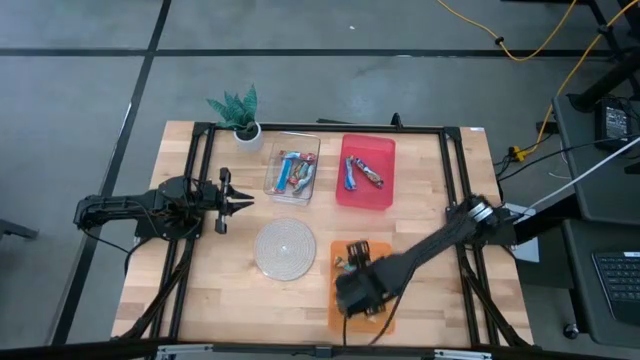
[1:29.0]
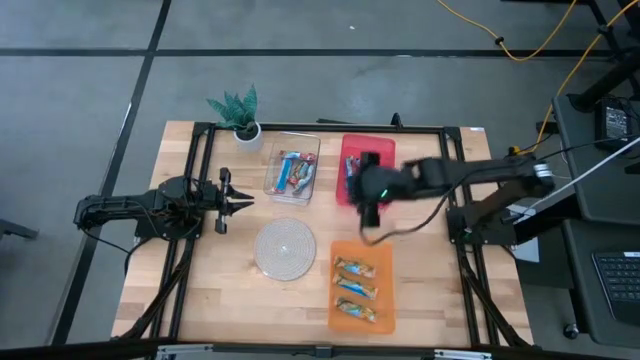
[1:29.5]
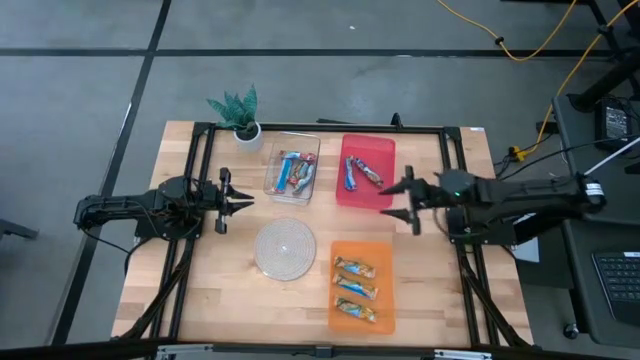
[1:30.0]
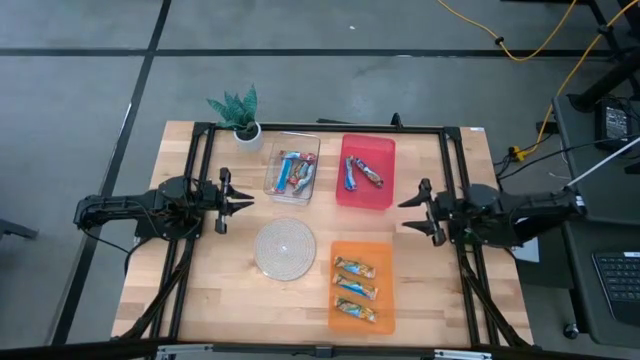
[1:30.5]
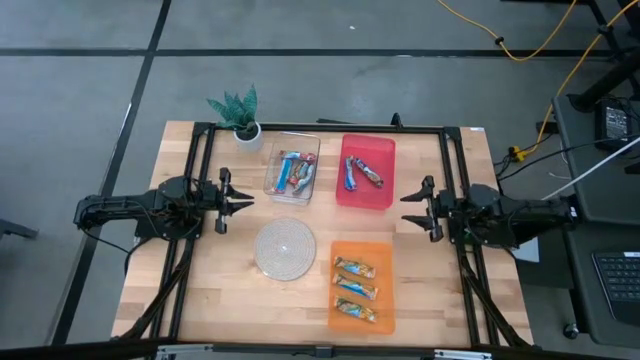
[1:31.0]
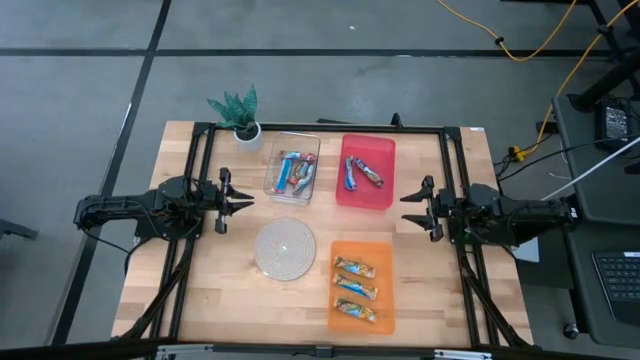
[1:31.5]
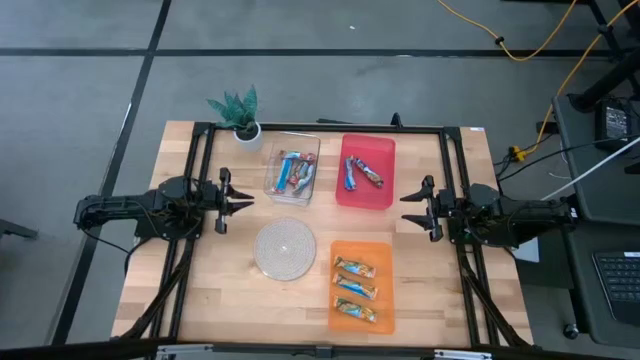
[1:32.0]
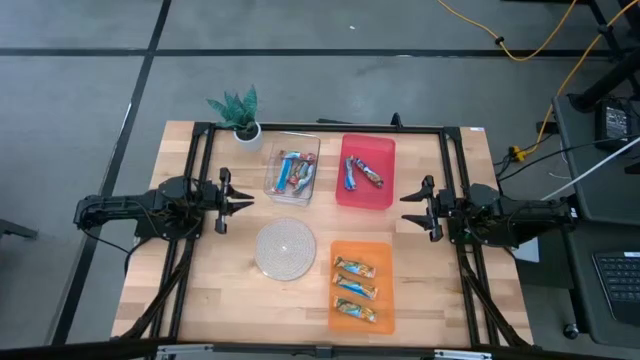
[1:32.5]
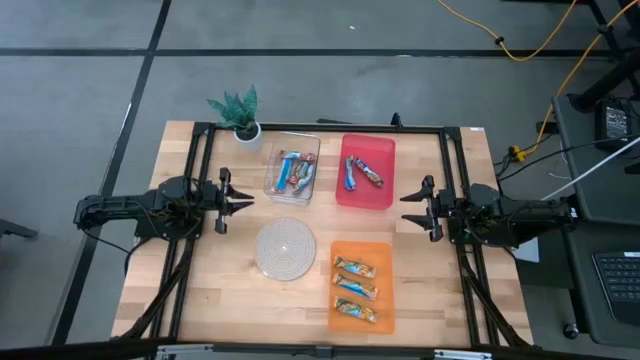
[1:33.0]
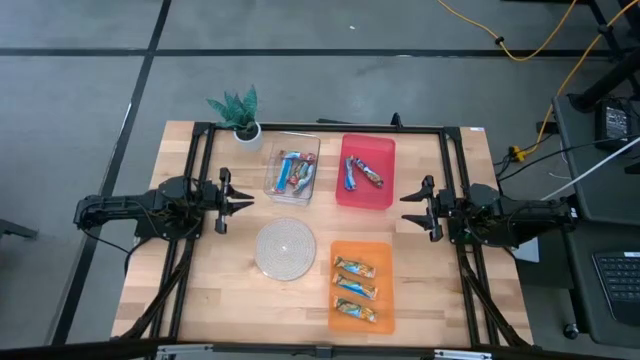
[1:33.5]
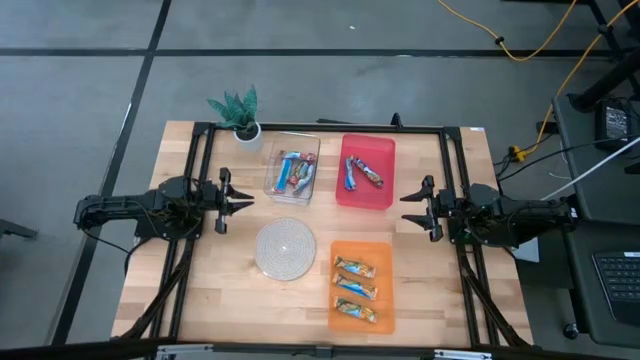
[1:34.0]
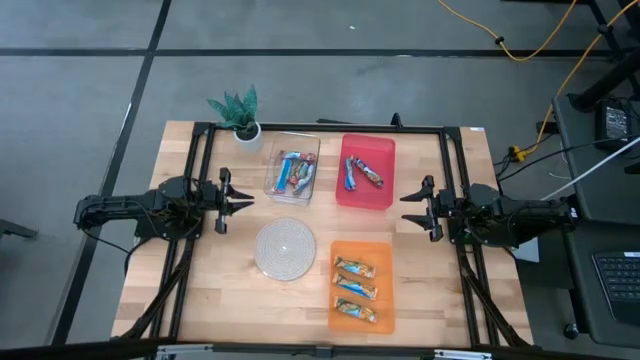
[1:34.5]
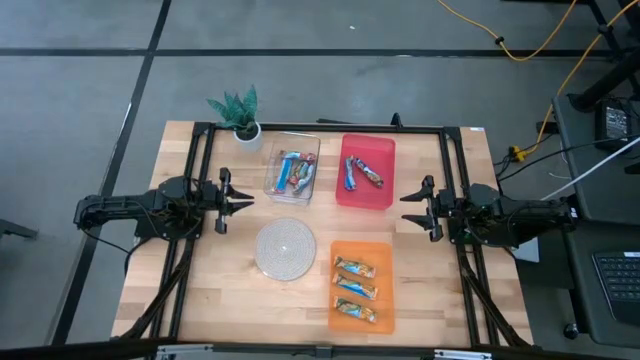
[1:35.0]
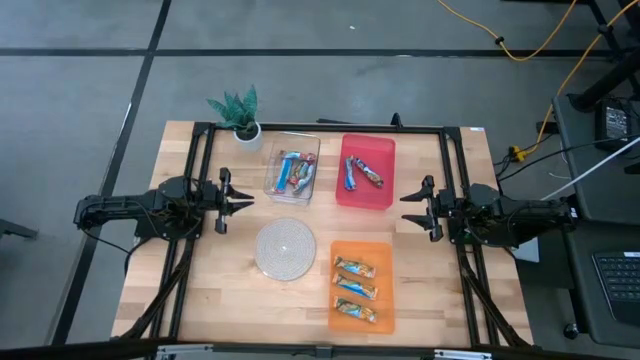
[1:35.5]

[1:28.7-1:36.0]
Task: Pick and place Granola Bars by type
Return to Home Position

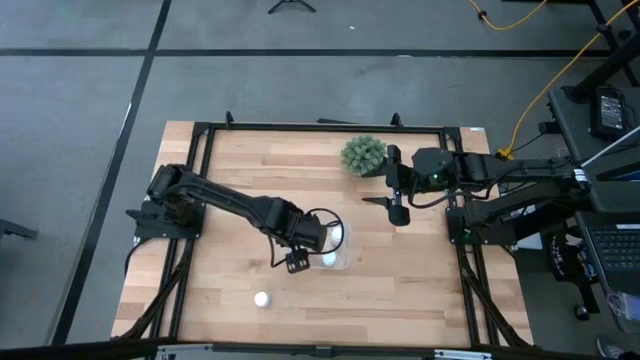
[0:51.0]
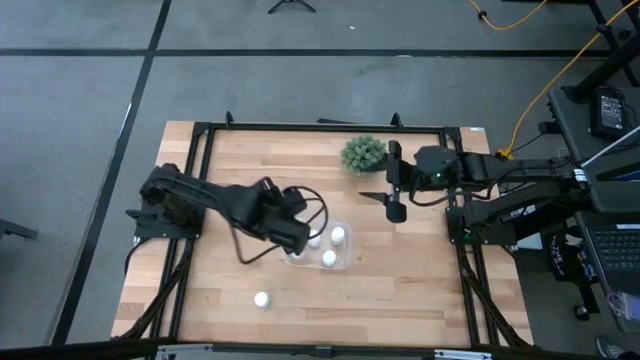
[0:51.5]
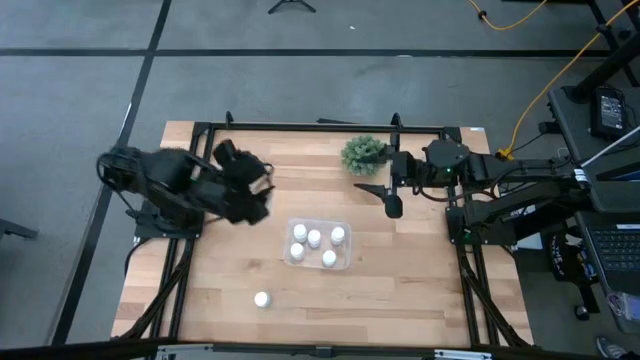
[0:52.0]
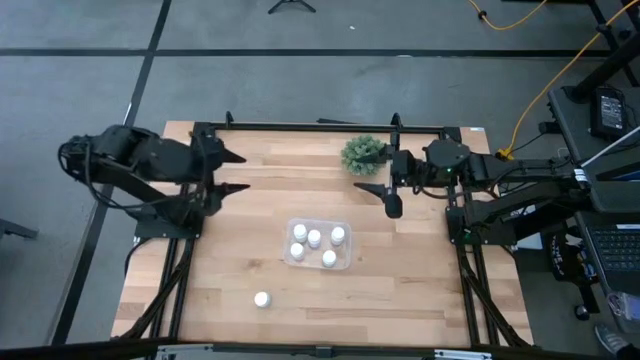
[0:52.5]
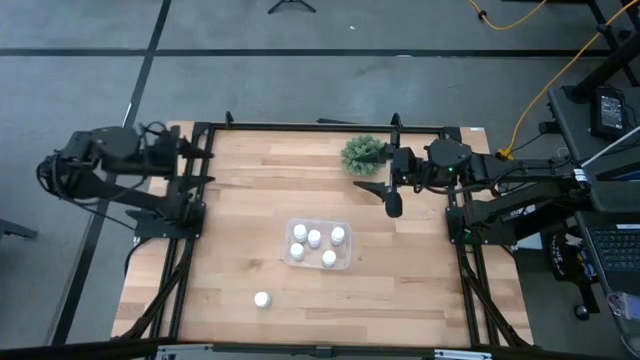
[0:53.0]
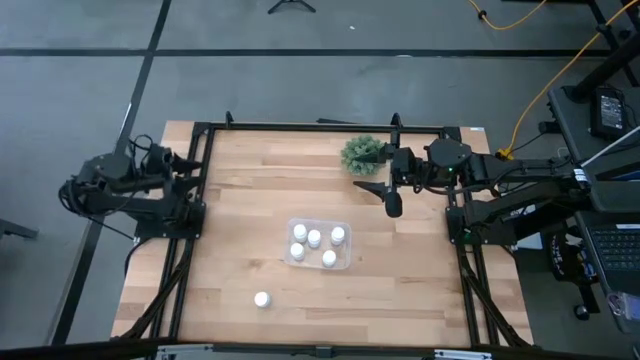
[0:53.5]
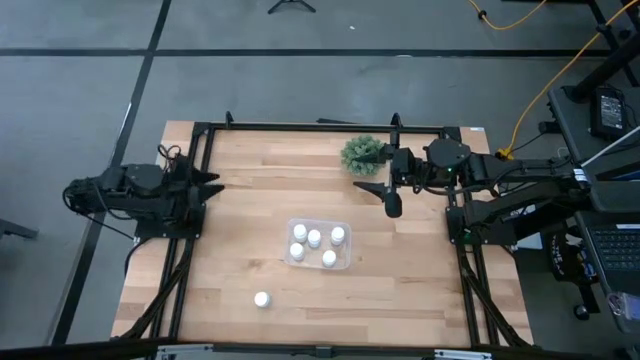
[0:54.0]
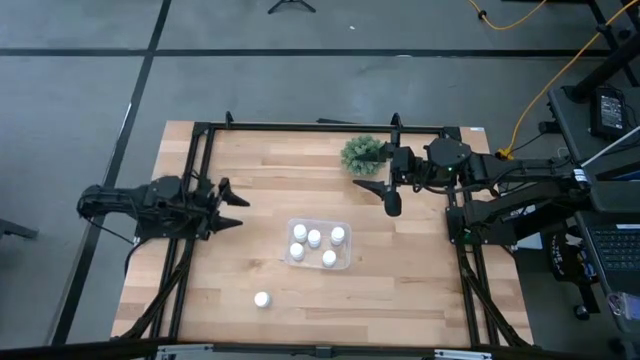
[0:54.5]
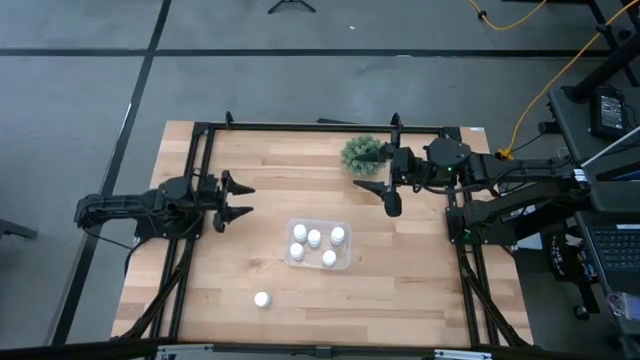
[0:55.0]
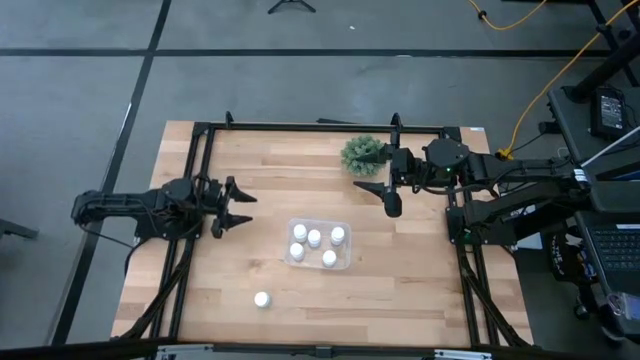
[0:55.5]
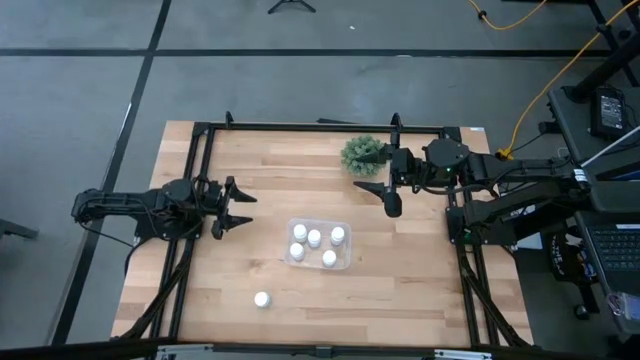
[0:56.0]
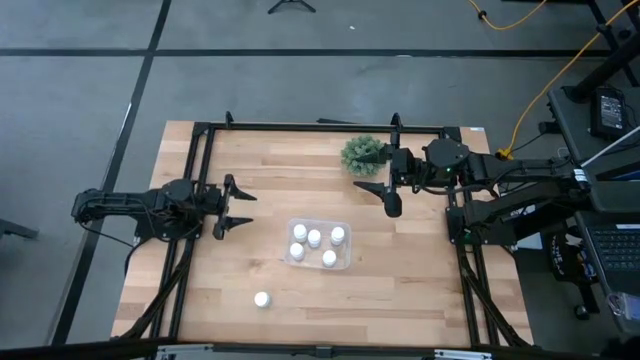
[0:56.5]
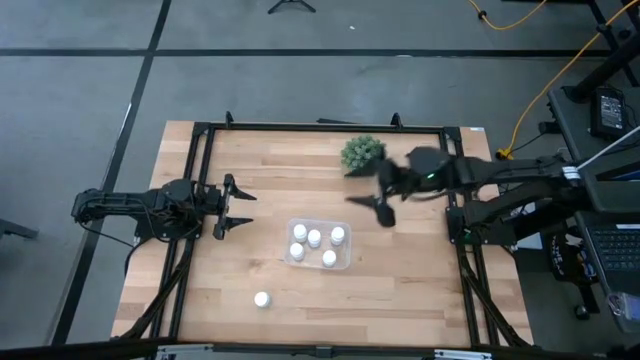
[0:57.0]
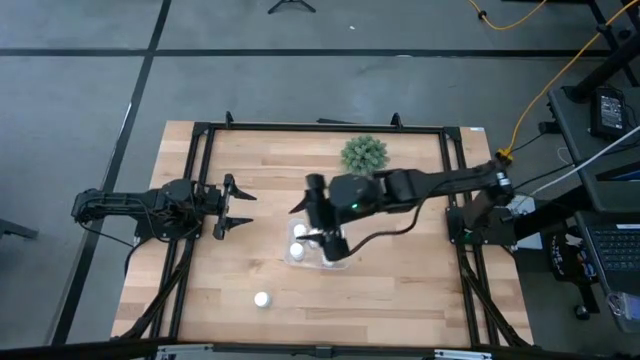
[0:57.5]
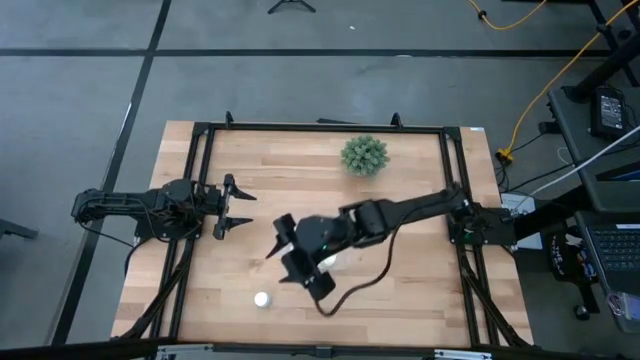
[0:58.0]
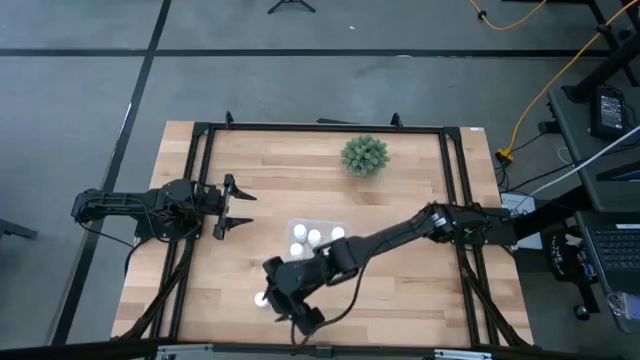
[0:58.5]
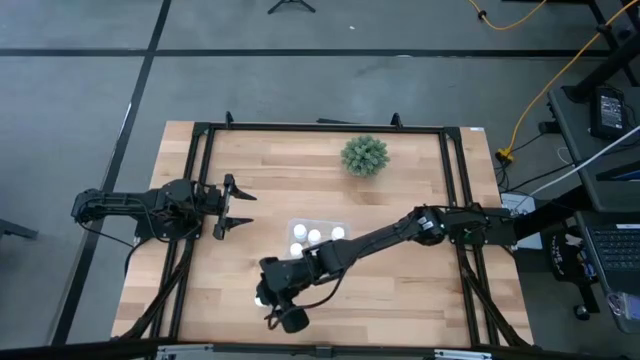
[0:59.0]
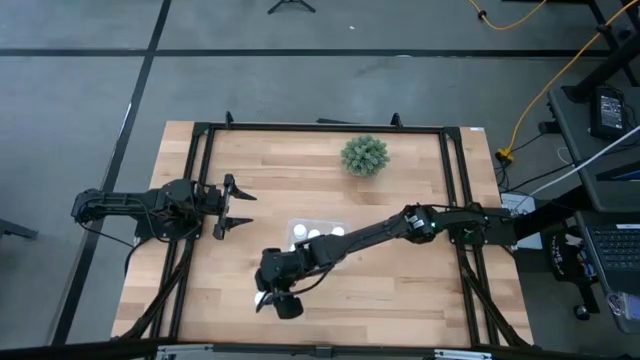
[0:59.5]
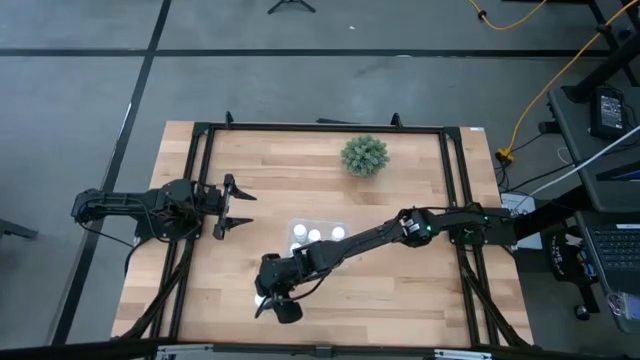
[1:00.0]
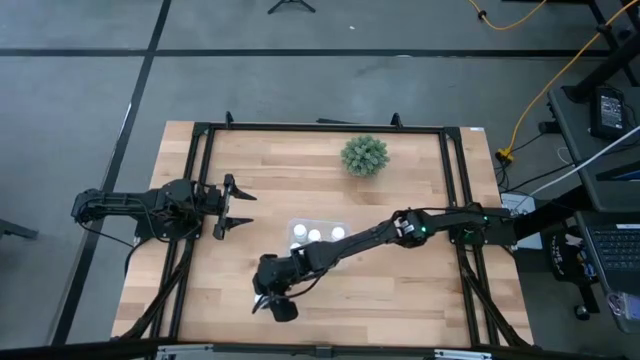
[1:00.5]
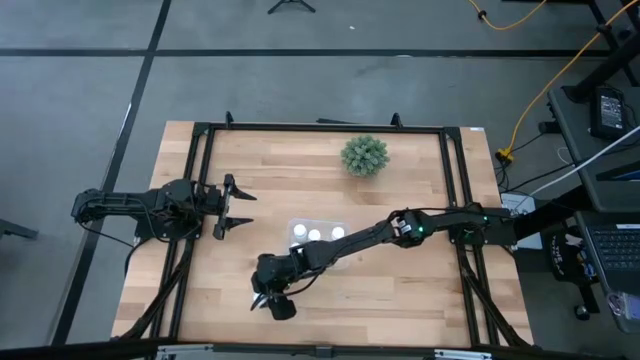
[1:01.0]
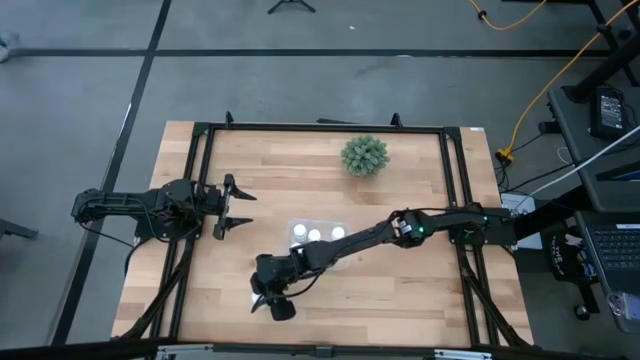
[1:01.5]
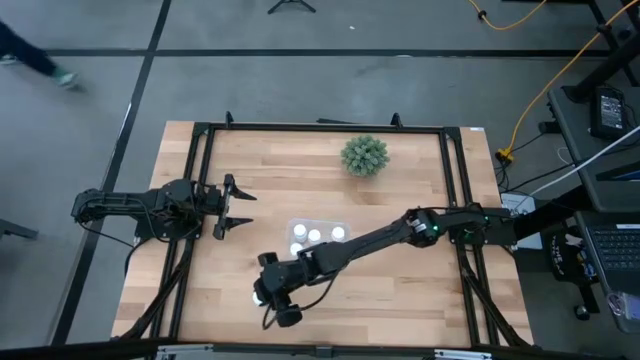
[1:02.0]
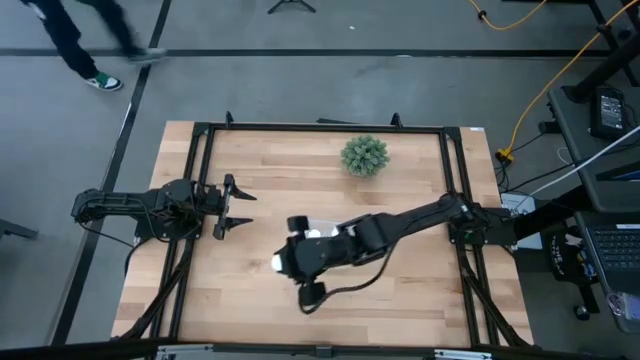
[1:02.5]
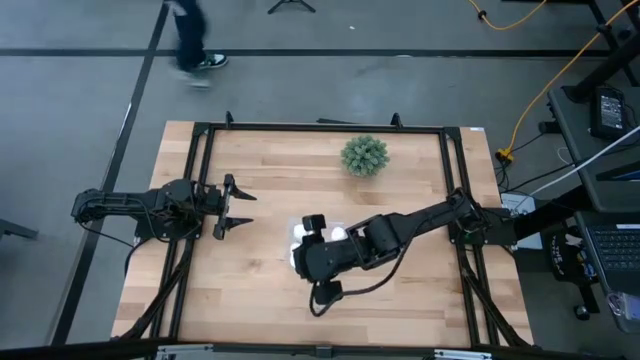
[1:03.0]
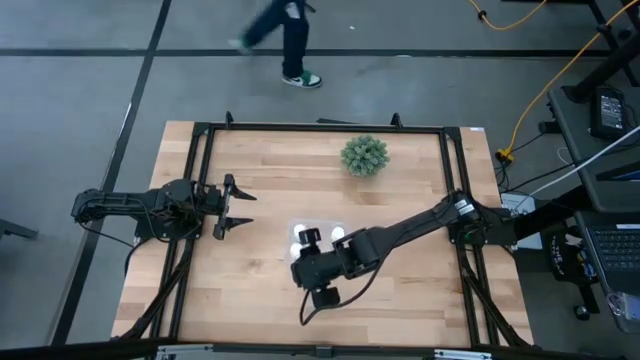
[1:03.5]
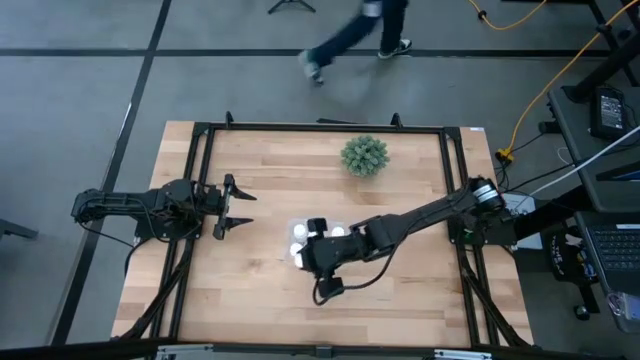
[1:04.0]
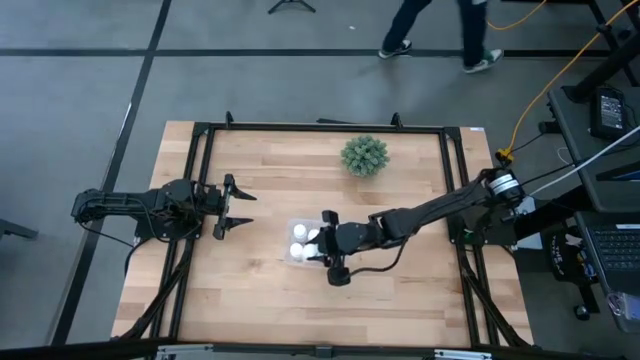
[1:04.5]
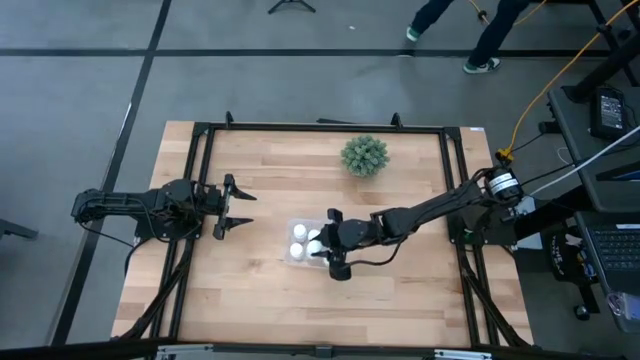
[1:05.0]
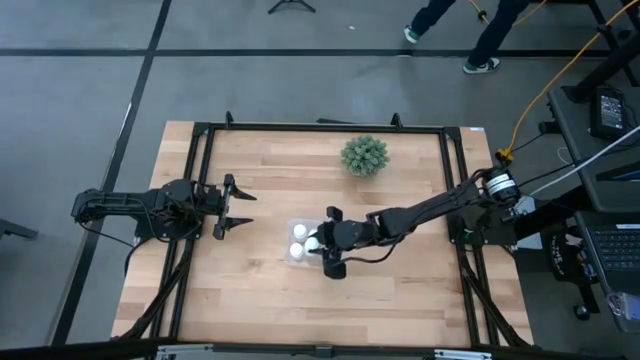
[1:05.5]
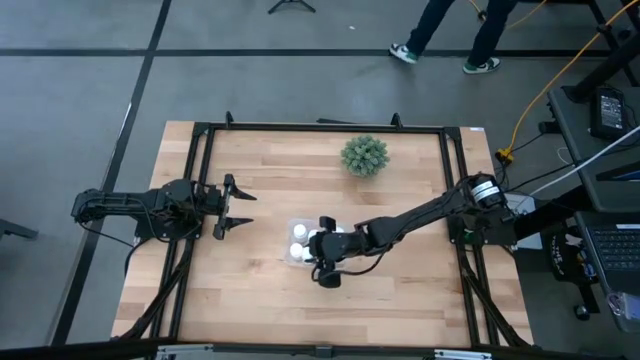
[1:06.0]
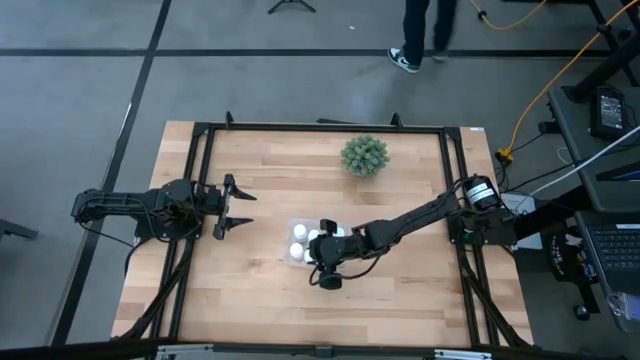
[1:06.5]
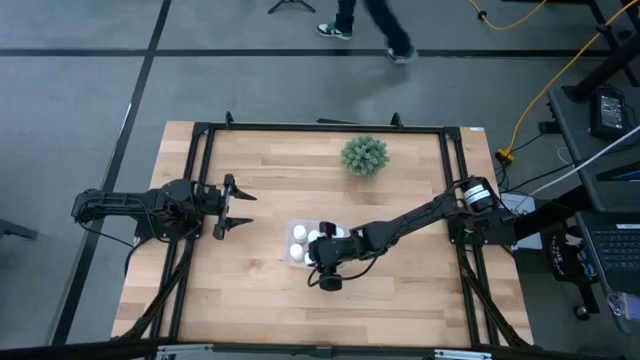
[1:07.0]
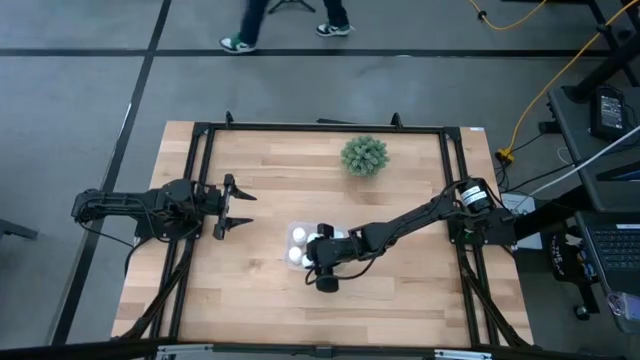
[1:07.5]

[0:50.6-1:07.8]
Task: Pick and place pill bottles into a basket
Put the white medicine bottle into the transparent bin
